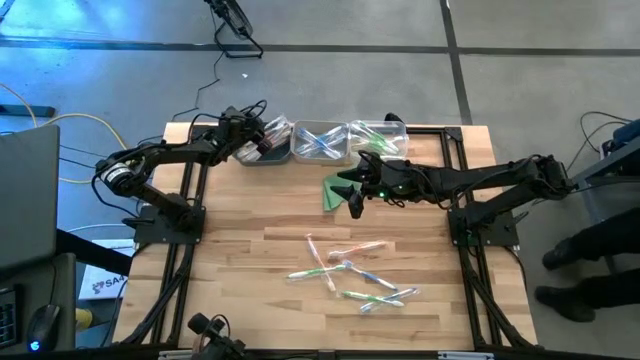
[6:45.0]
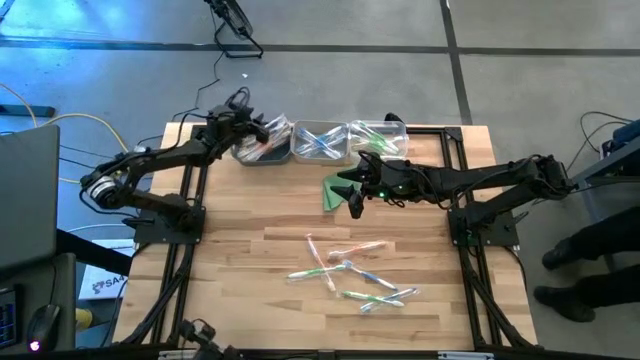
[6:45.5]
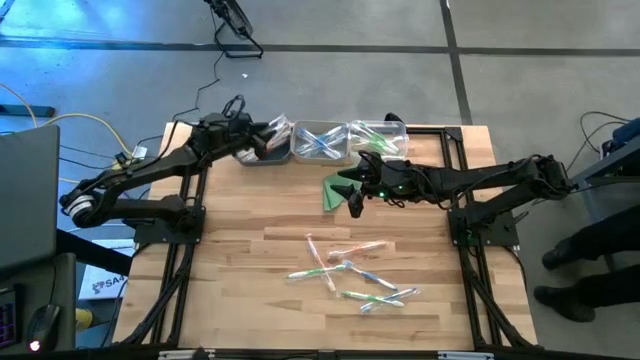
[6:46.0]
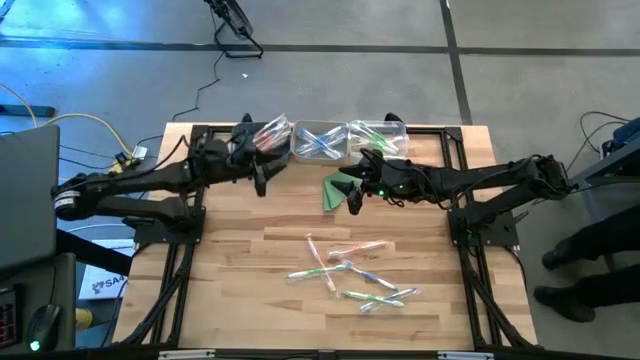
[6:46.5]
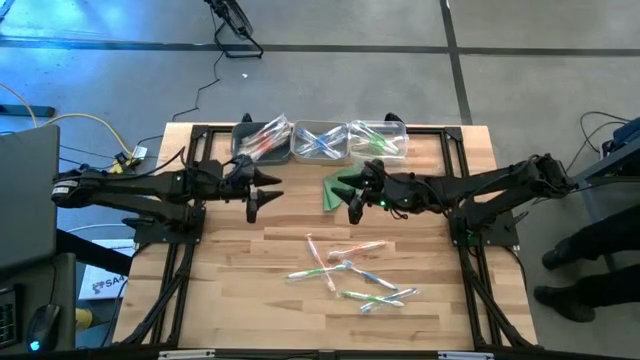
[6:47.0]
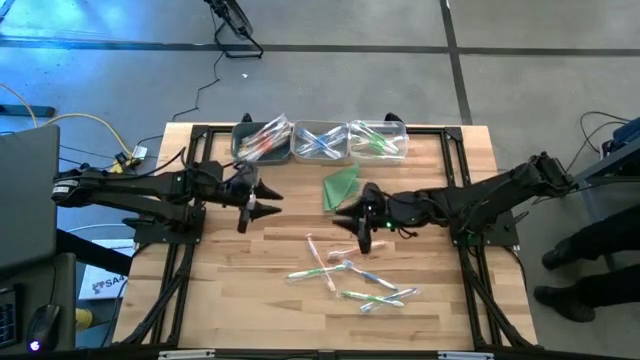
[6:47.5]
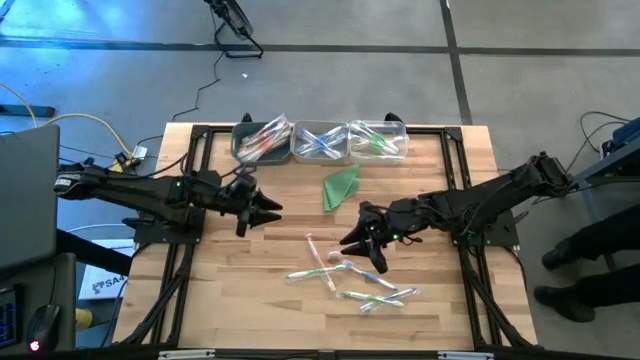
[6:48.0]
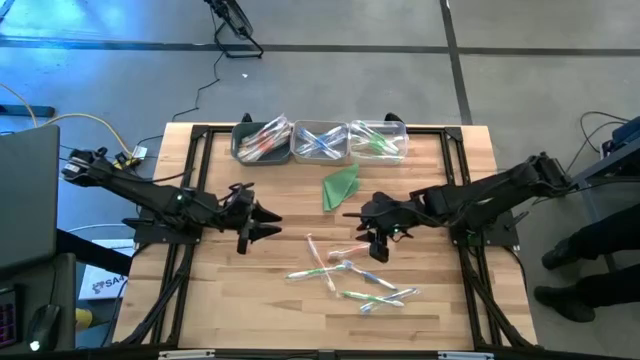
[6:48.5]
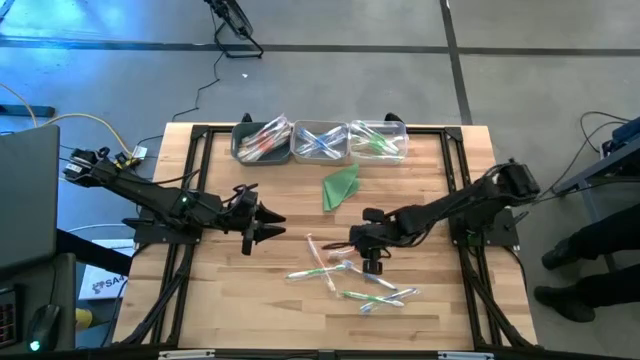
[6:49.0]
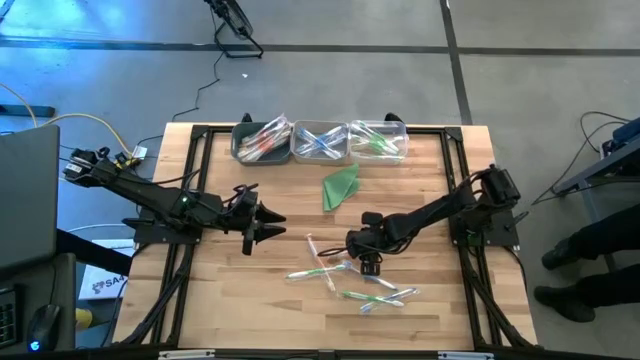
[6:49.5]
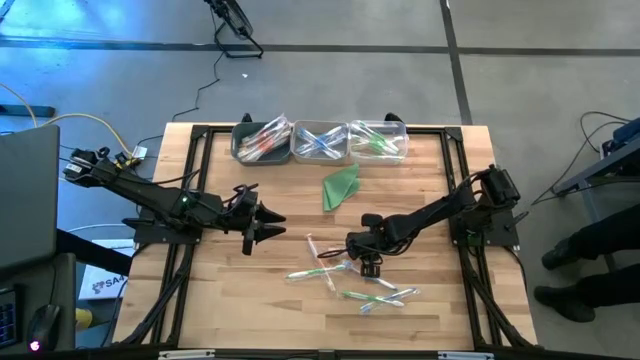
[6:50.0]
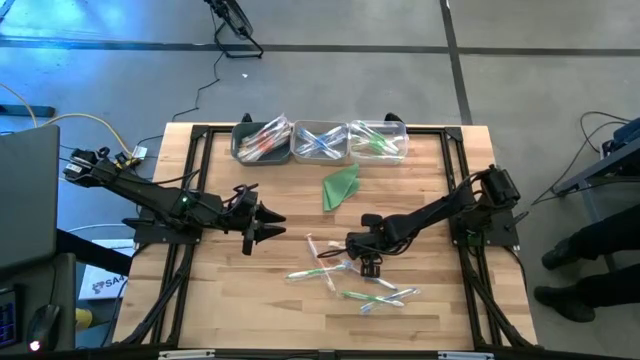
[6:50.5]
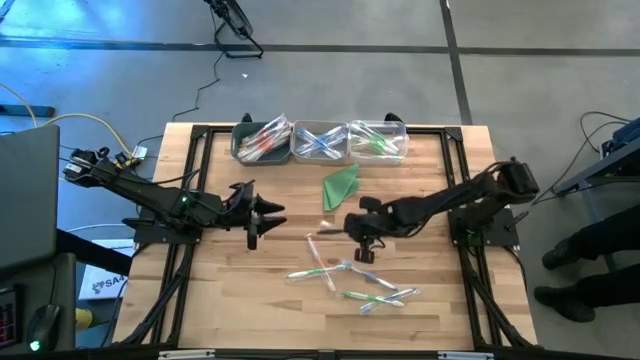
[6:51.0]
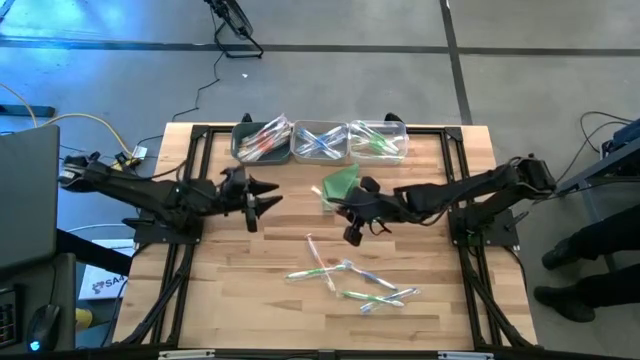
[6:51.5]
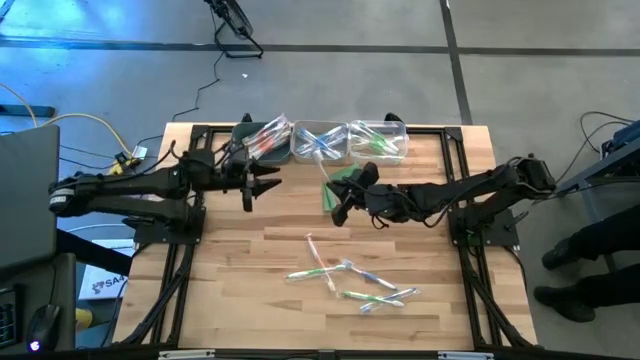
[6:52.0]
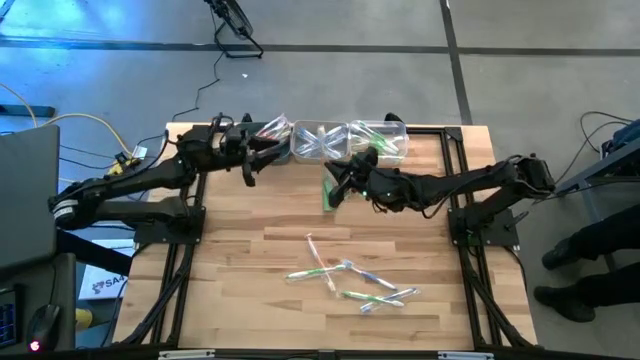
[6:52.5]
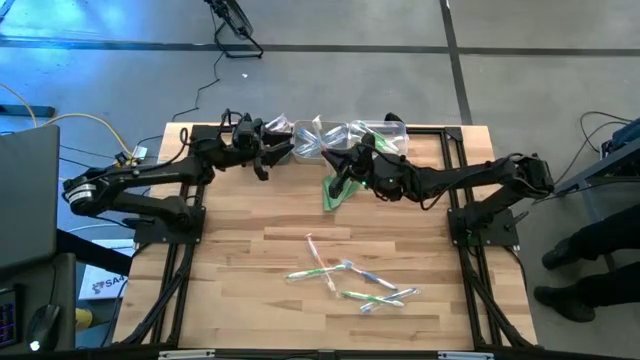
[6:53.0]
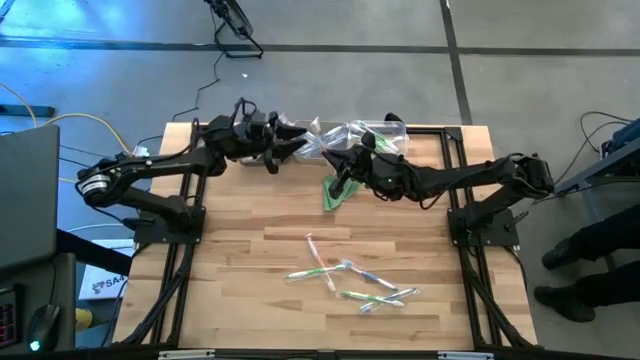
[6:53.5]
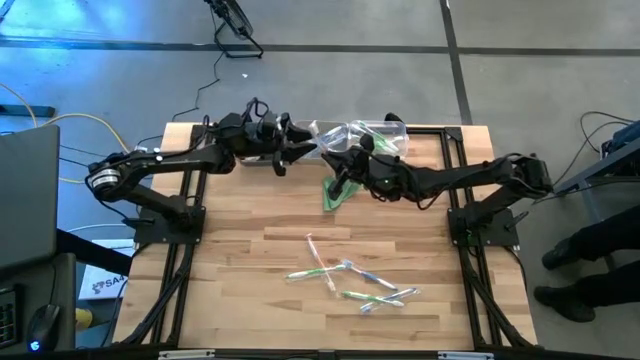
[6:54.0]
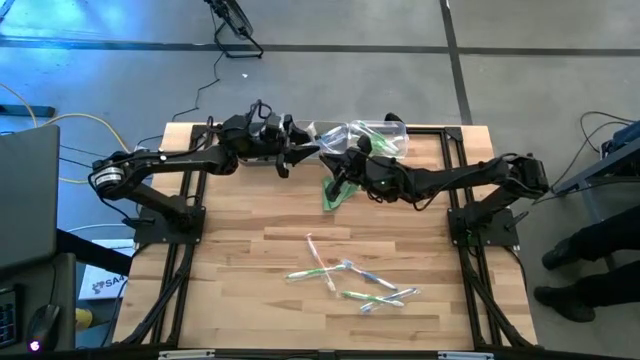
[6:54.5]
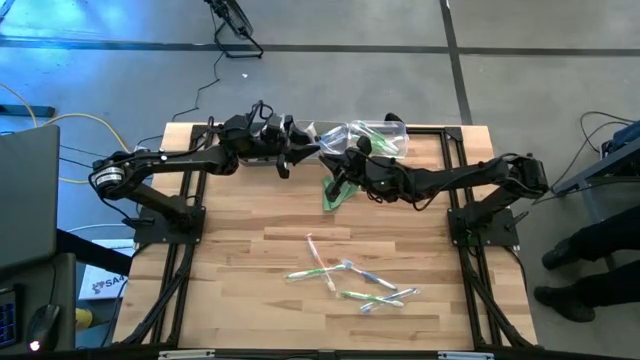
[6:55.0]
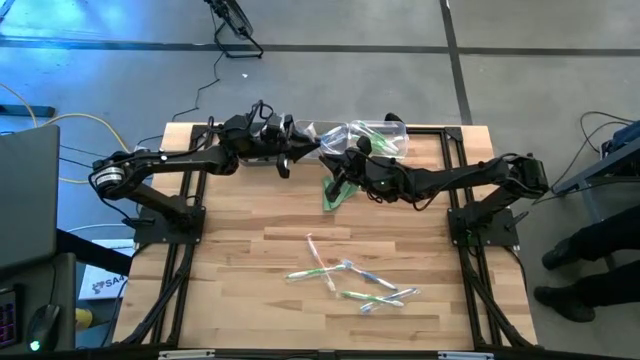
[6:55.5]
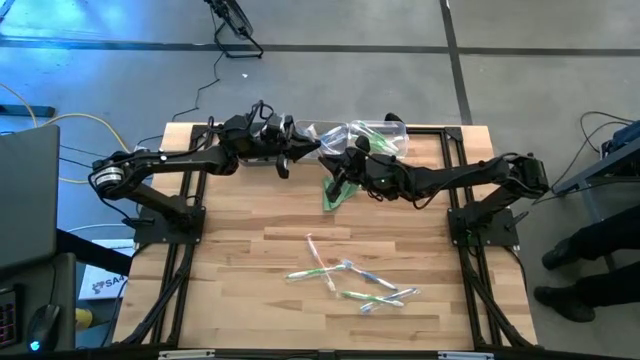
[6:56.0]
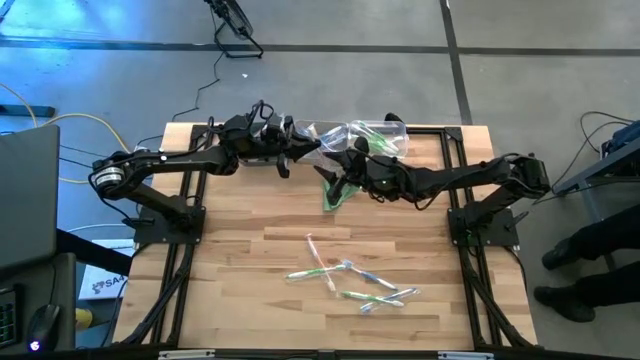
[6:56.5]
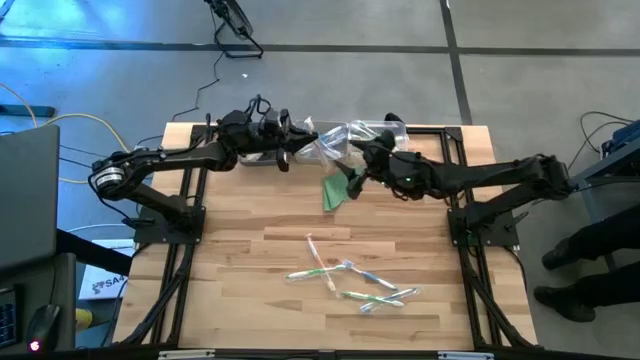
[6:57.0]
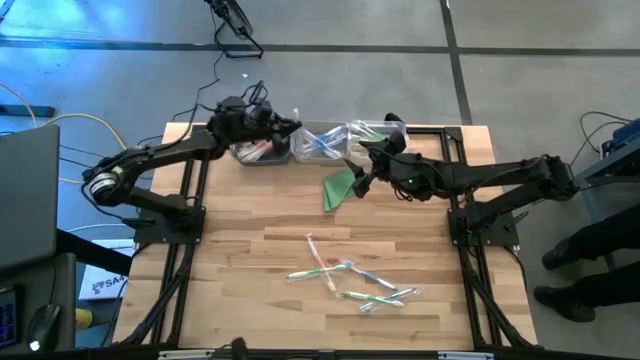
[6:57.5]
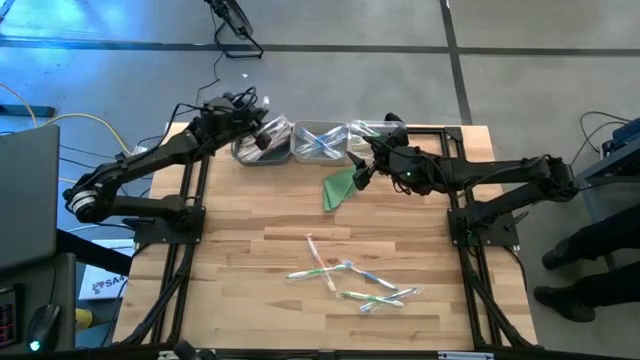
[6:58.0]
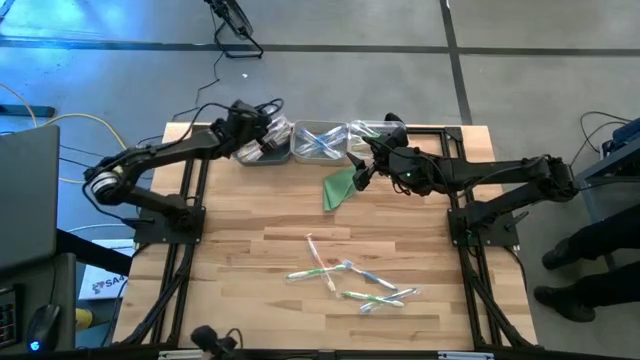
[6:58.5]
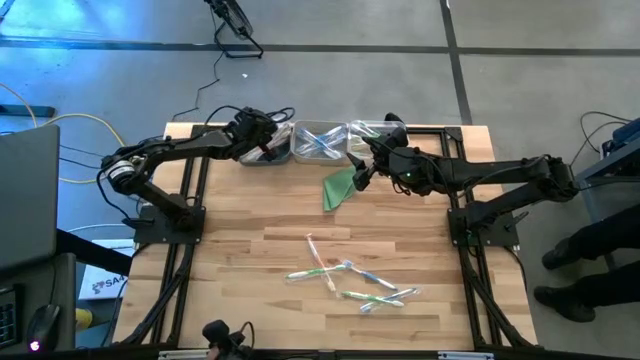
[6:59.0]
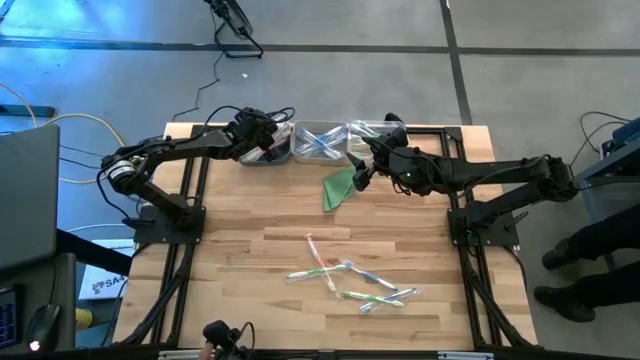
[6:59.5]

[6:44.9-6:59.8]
Task: Pick & Place Toothbrushes
Put the orange toothbrush into the dark blue bin

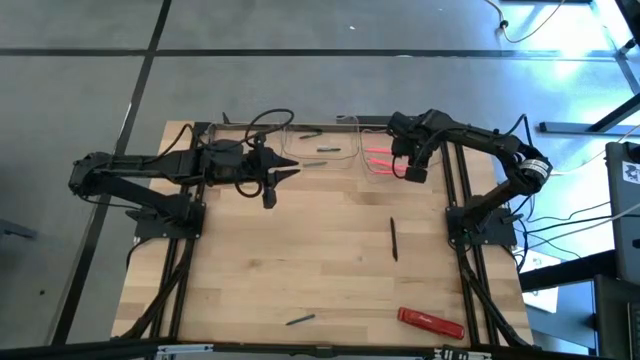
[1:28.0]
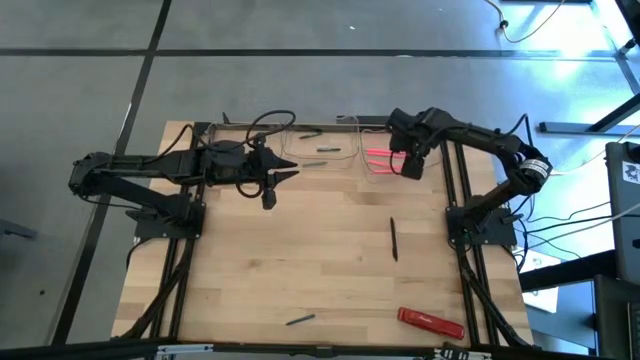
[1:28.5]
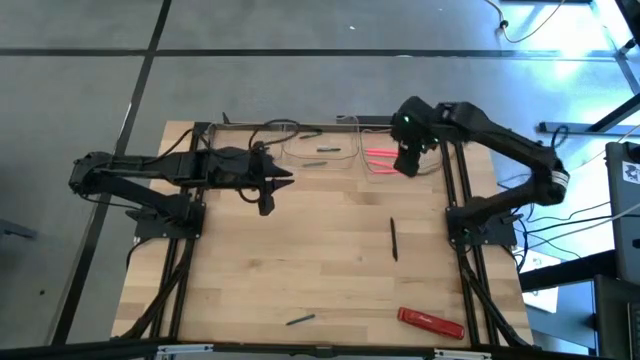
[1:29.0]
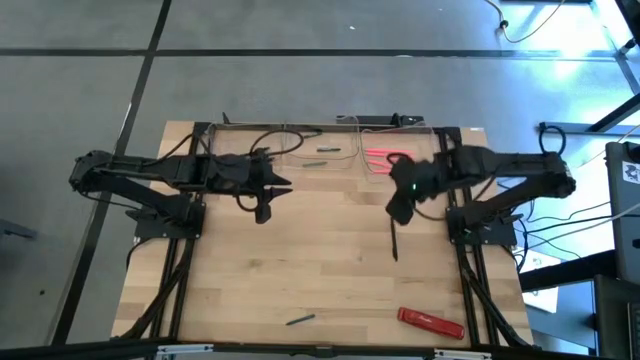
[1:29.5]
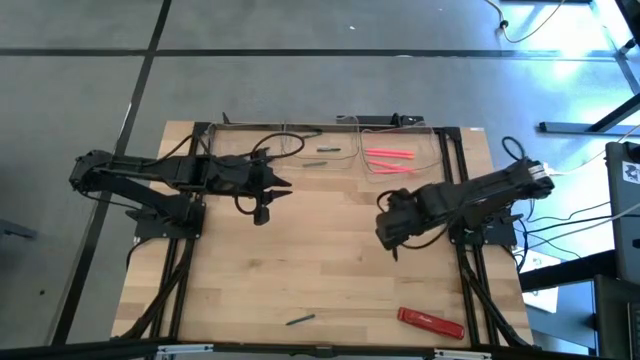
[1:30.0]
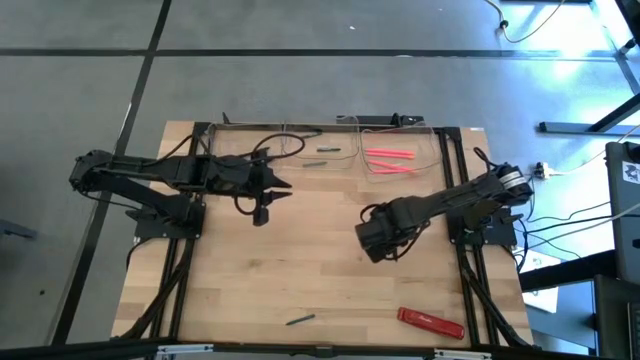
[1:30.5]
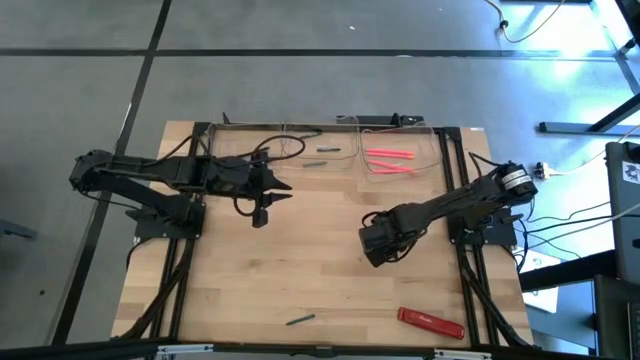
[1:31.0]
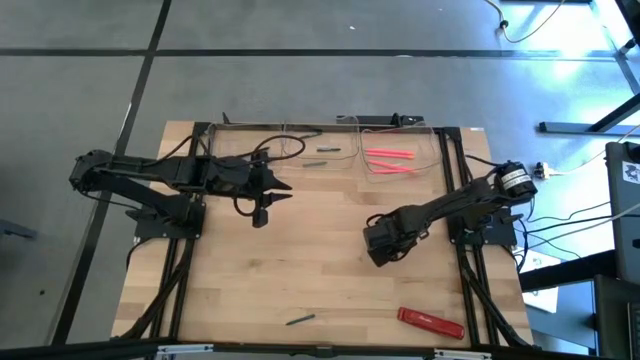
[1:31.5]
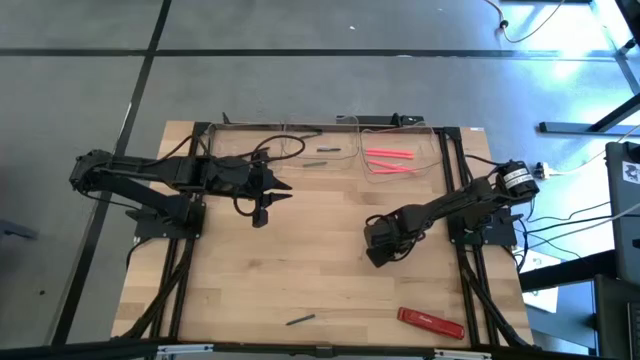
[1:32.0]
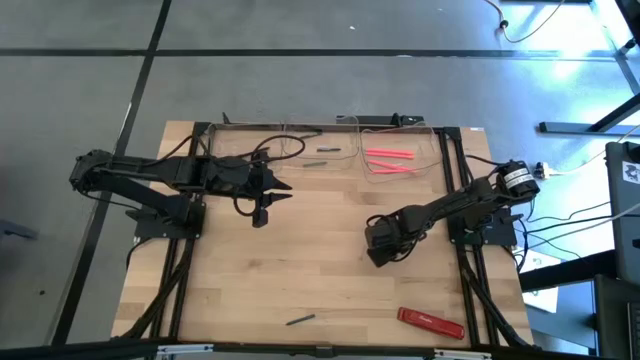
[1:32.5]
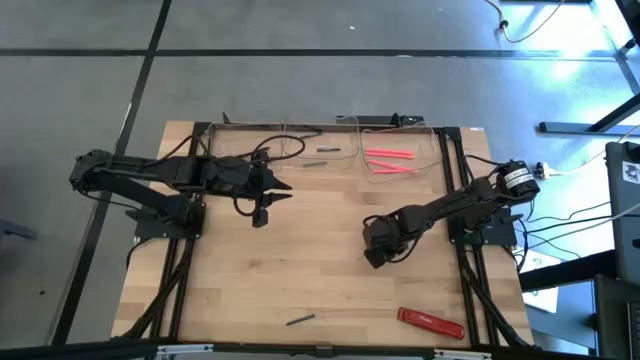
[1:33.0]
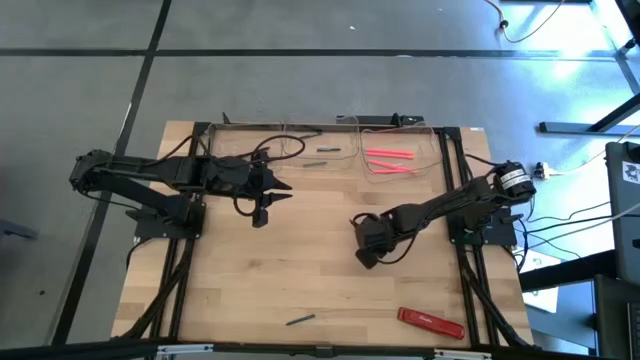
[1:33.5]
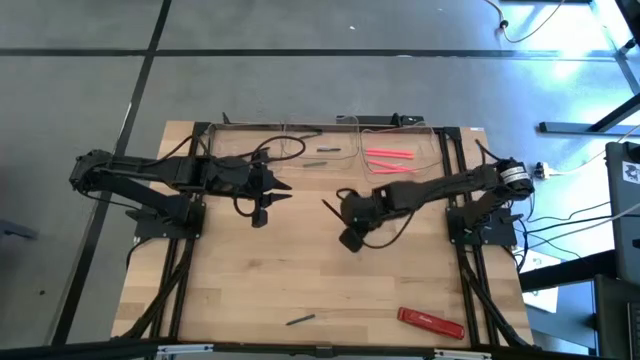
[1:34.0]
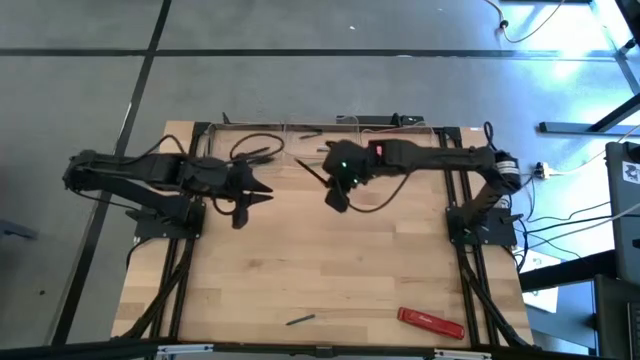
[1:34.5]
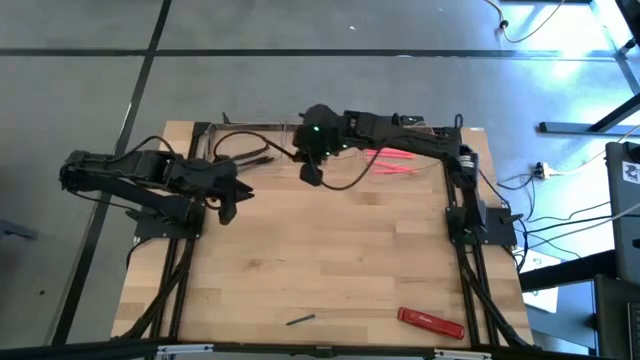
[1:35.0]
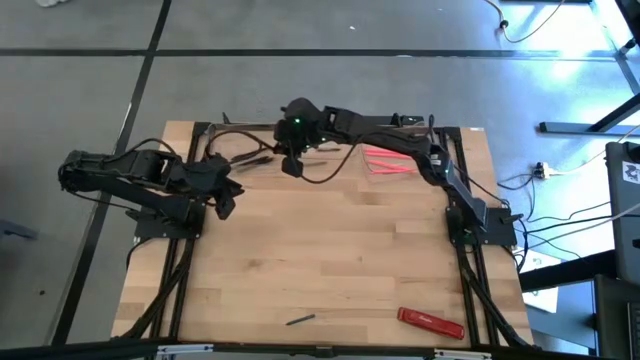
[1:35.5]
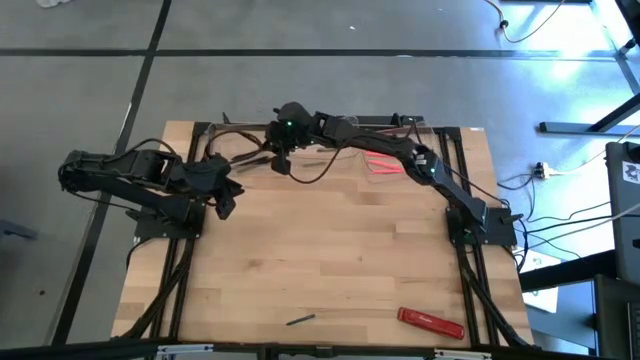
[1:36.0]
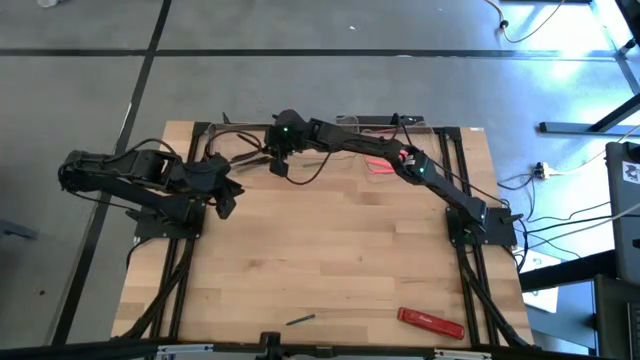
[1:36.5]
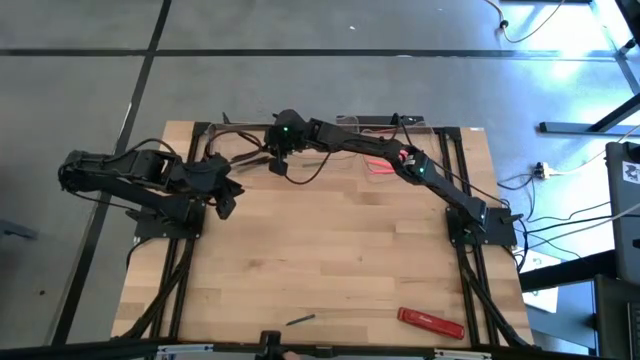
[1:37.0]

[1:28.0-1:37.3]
Task: Sort crayons/erasers/pens/pencils in bins
Put the black pen into the left transparent bin
